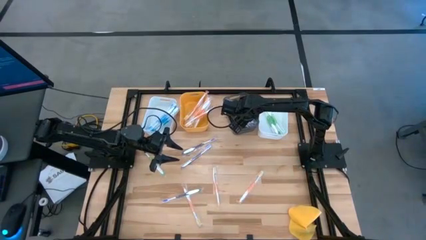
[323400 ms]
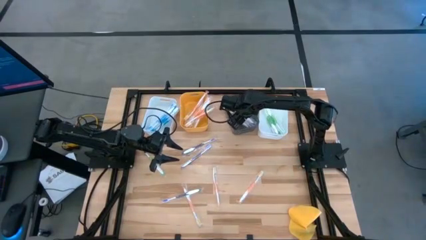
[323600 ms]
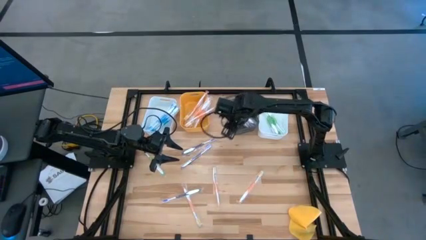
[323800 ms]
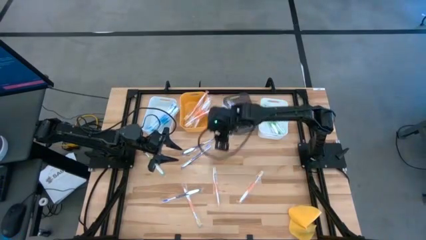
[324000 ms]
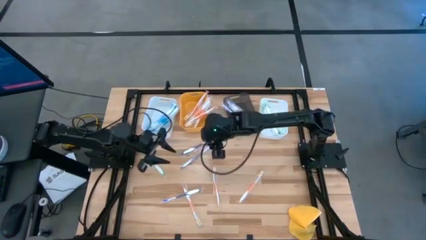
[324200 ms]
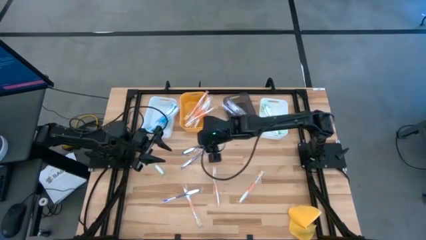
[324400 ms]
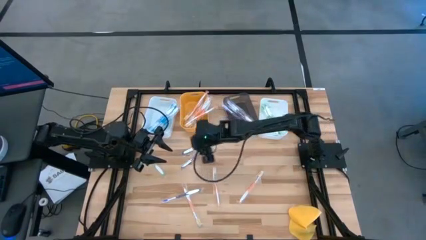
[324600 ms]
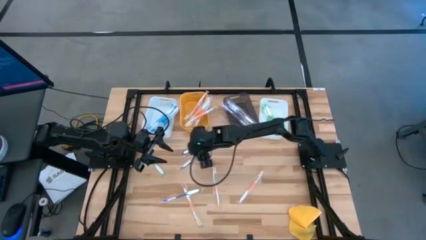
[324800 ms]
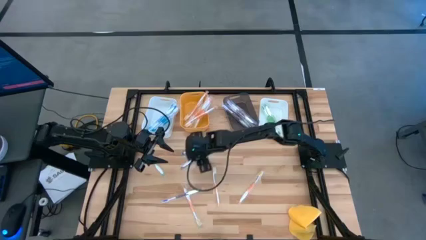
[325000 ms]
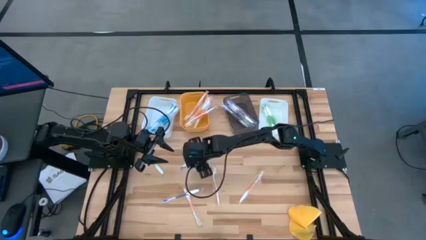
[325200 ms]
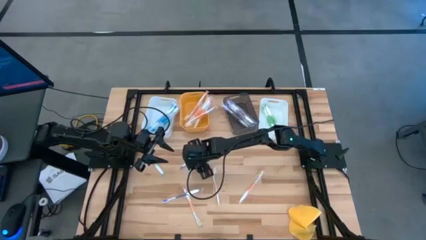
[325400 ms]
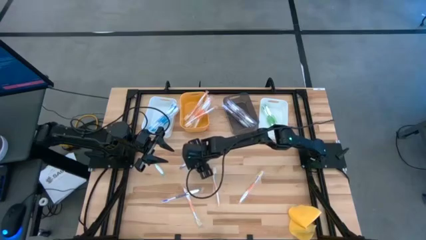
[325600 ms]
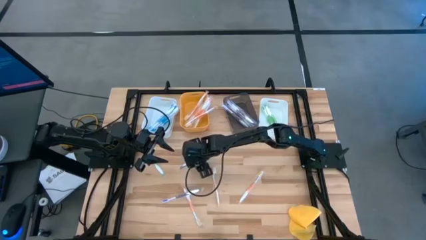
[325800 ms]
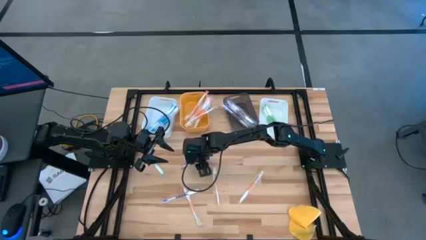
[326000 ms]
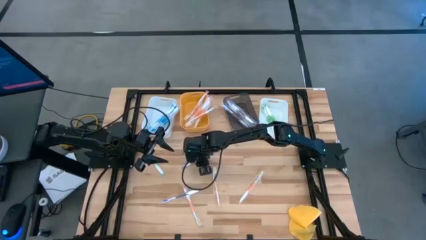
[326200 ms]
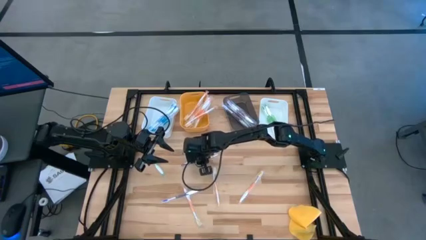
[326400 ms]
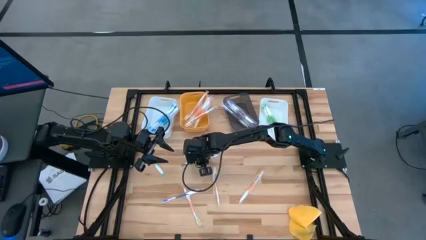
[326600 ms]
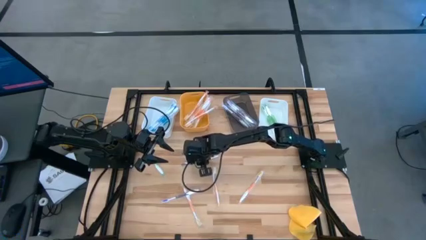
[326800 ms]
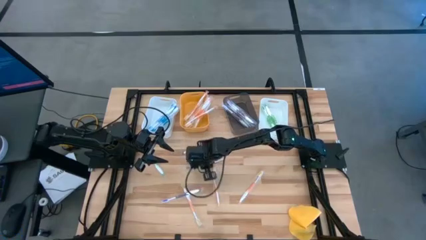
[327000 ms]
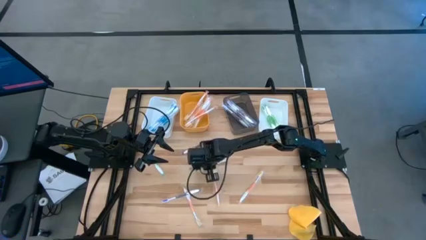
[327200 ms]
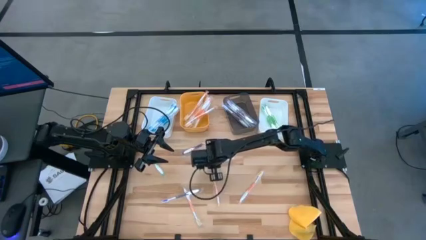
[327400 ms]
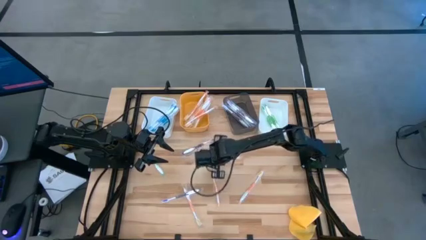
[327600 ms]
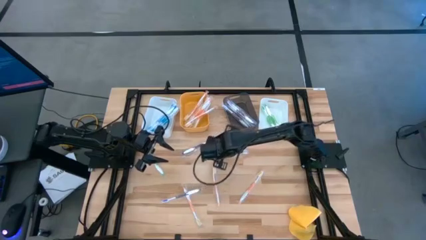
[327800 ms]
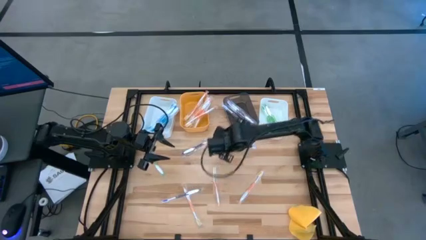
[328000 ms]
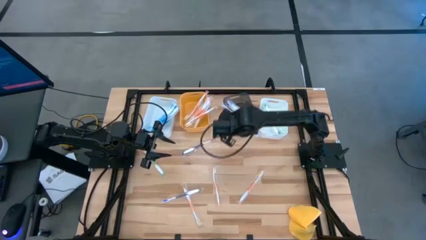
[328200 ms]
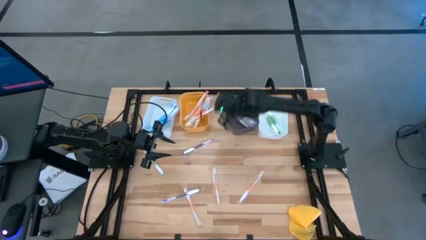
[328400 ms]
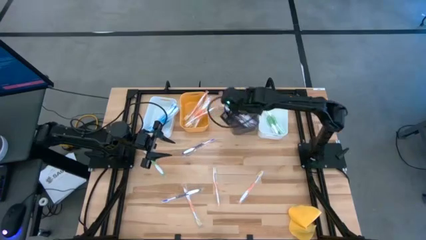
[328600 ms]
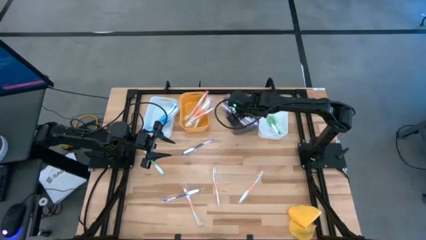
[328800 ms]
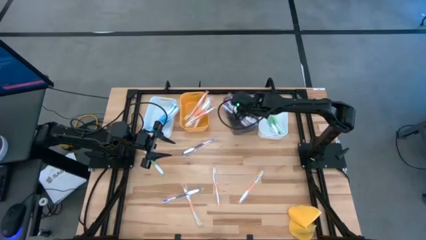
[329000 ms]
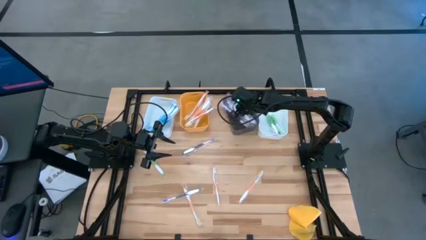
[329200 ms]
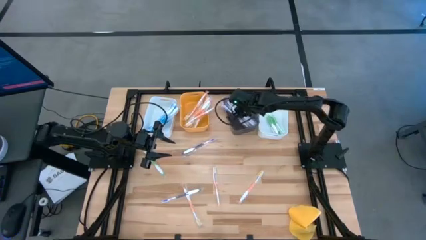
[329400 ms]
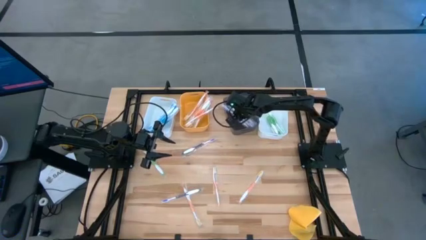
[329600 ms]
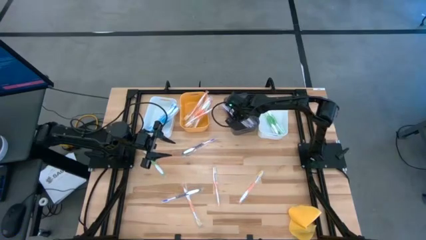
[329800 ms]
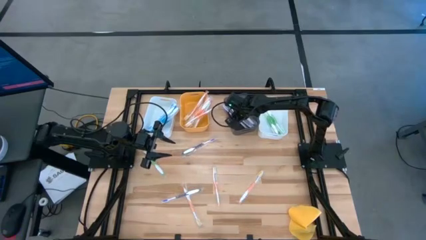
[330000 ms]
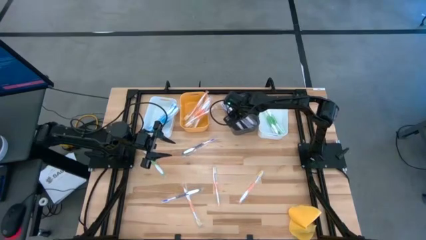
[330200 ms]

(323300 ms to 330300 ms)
Task: Pick & Place Toothbrushes
Put the violet toothbrush into the gray bin

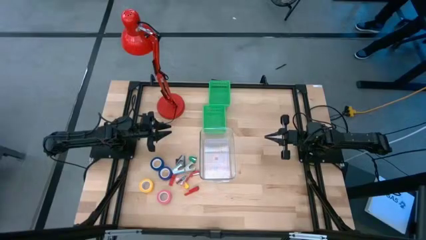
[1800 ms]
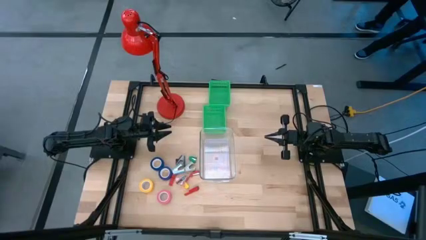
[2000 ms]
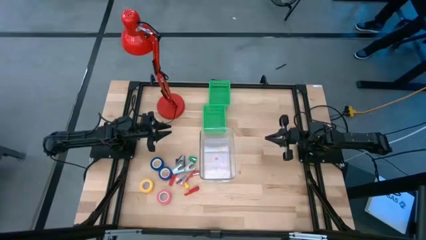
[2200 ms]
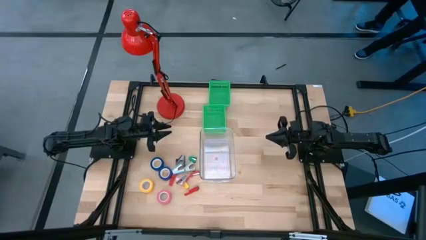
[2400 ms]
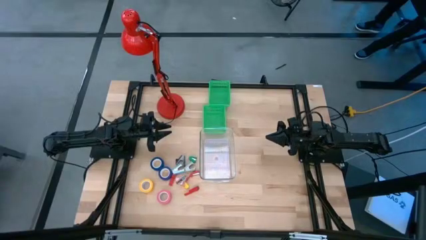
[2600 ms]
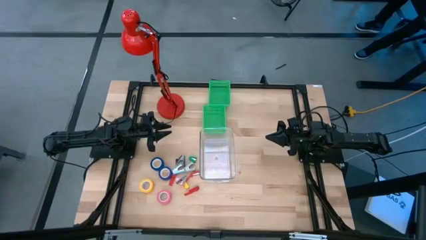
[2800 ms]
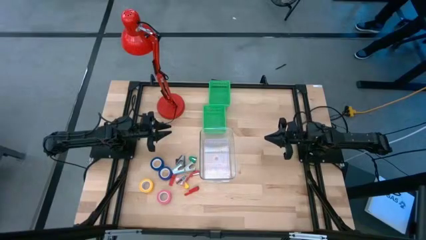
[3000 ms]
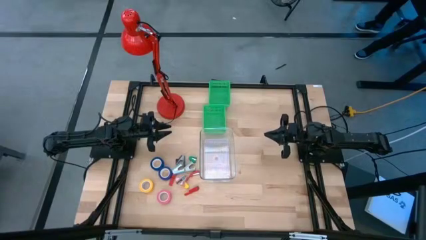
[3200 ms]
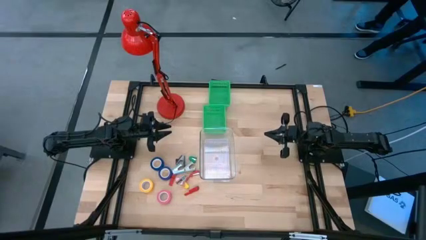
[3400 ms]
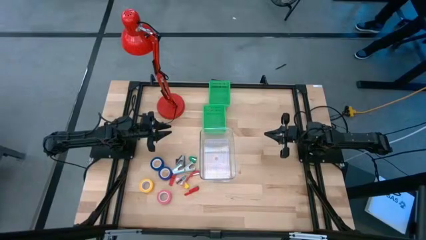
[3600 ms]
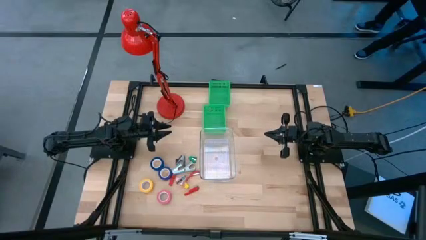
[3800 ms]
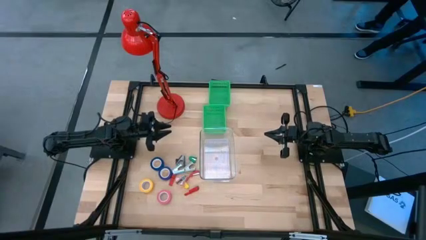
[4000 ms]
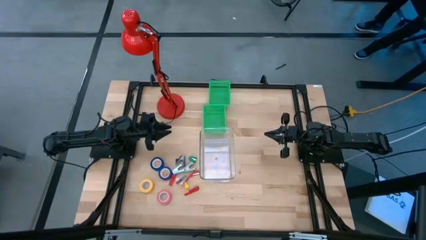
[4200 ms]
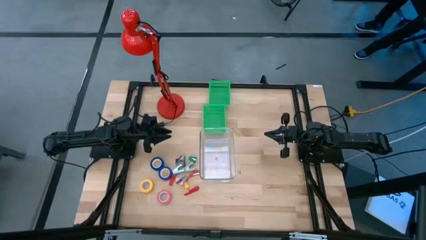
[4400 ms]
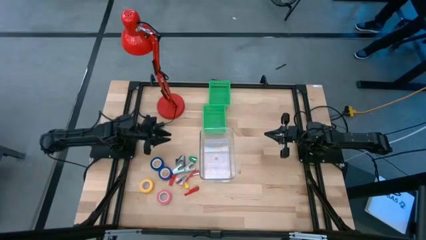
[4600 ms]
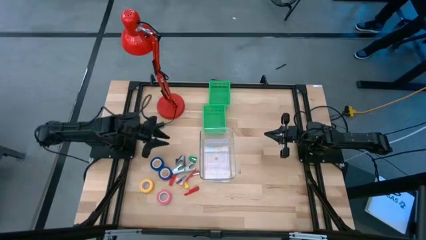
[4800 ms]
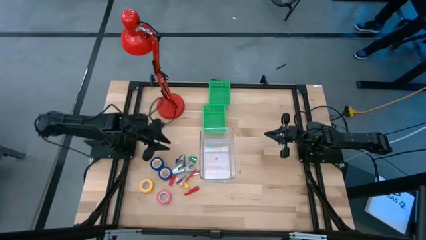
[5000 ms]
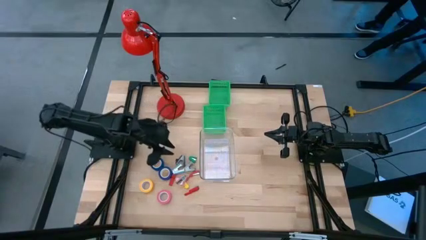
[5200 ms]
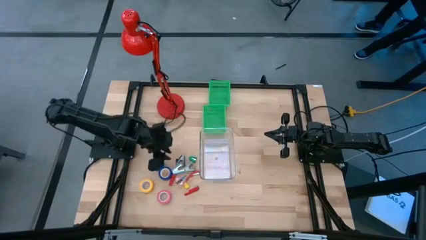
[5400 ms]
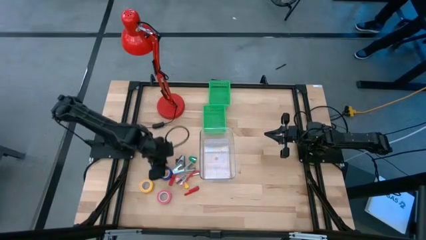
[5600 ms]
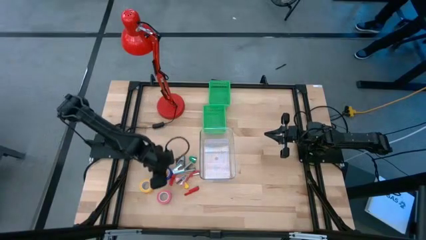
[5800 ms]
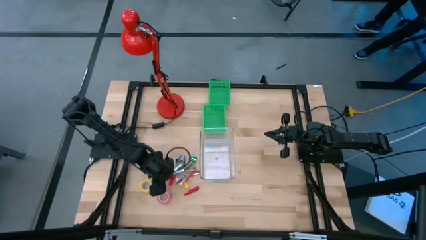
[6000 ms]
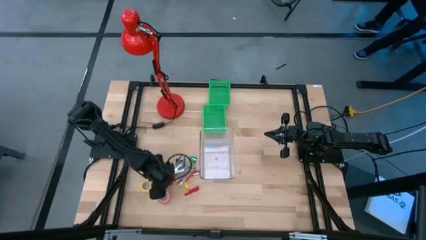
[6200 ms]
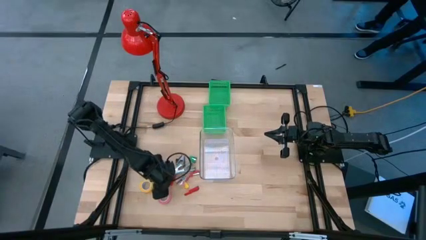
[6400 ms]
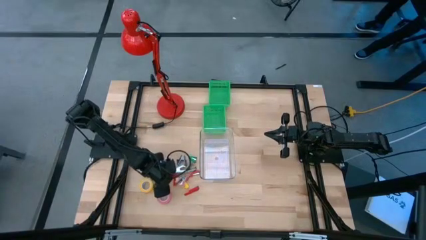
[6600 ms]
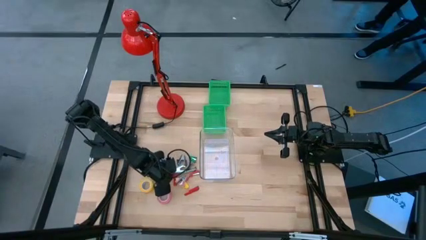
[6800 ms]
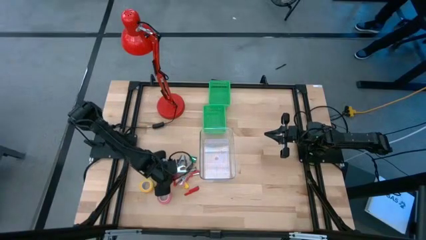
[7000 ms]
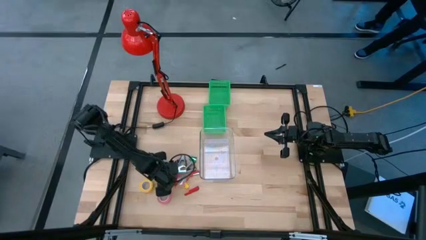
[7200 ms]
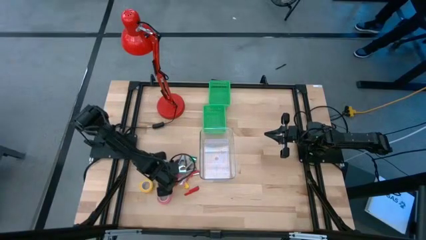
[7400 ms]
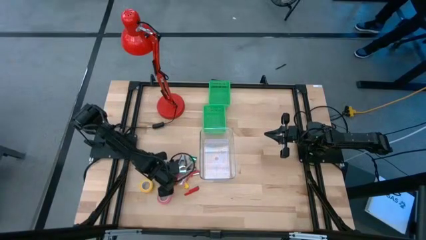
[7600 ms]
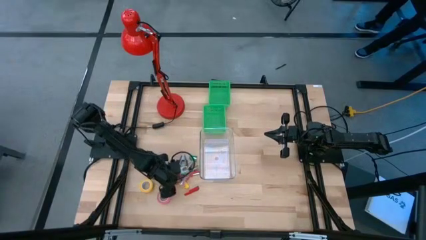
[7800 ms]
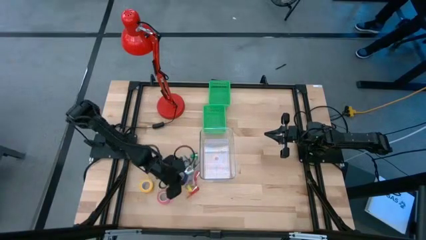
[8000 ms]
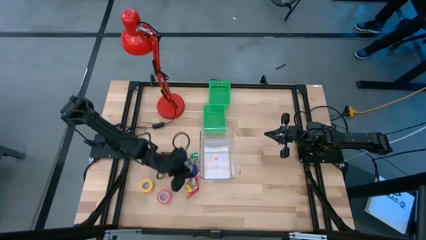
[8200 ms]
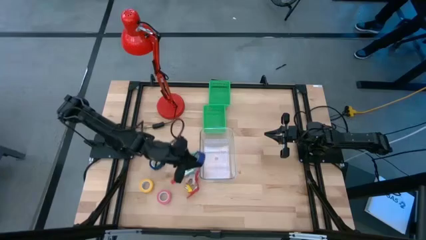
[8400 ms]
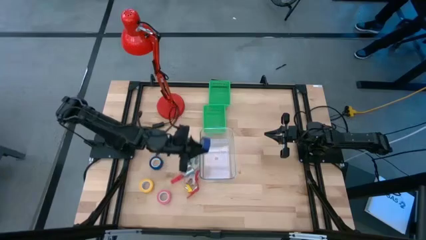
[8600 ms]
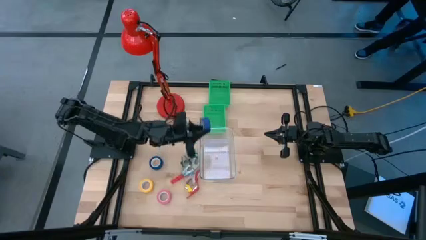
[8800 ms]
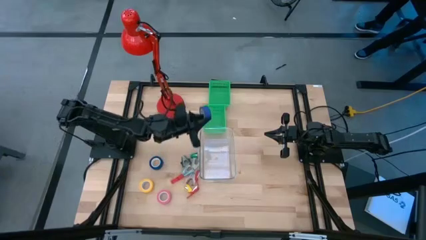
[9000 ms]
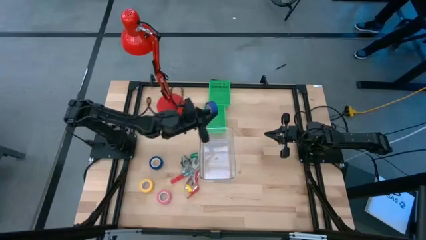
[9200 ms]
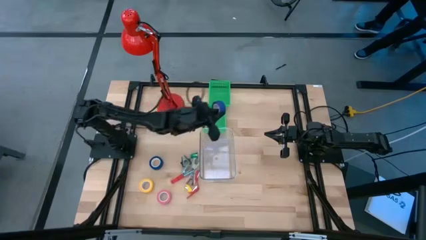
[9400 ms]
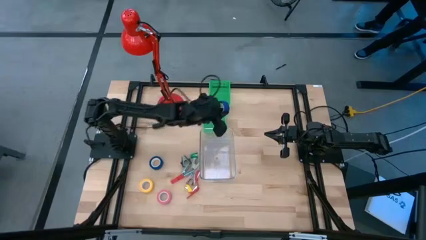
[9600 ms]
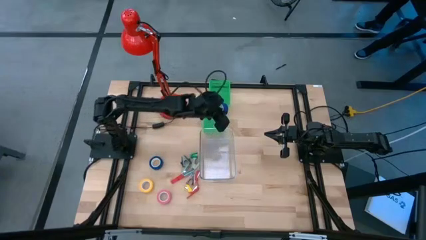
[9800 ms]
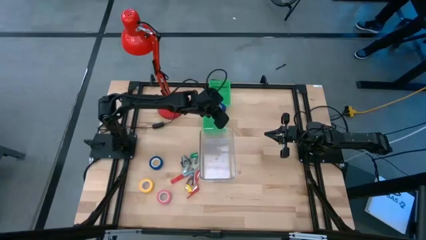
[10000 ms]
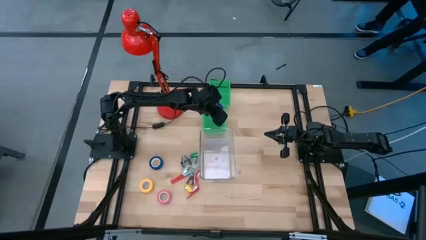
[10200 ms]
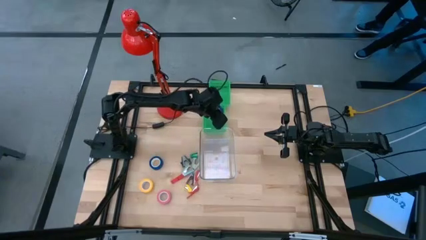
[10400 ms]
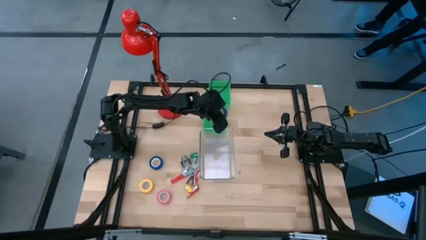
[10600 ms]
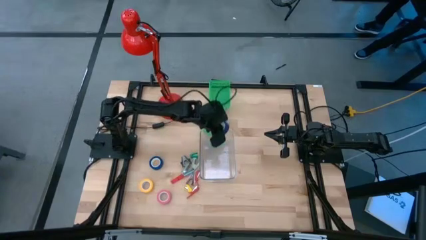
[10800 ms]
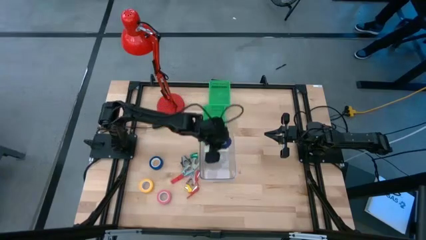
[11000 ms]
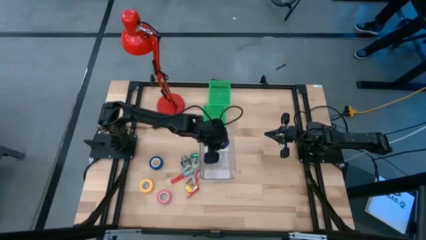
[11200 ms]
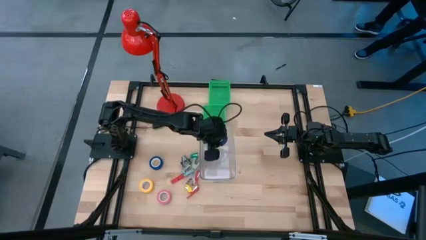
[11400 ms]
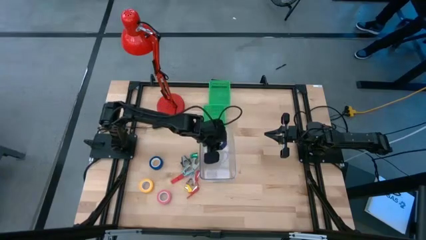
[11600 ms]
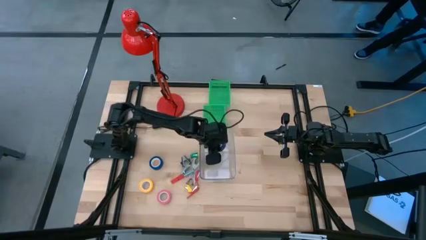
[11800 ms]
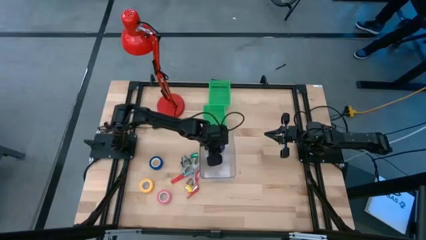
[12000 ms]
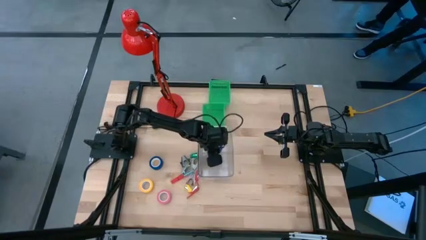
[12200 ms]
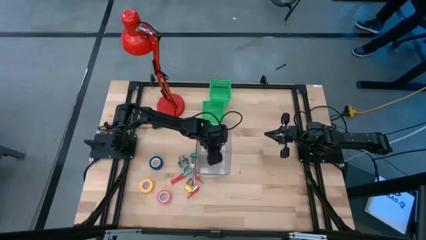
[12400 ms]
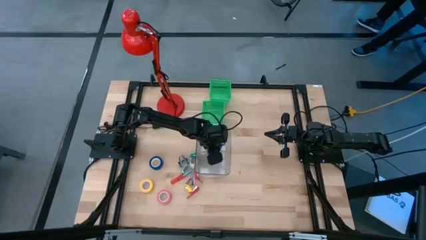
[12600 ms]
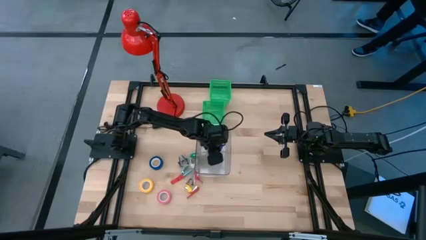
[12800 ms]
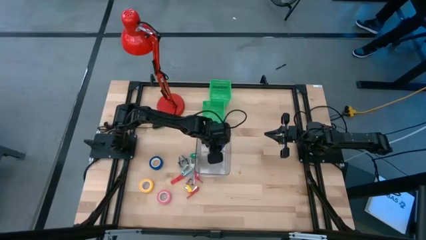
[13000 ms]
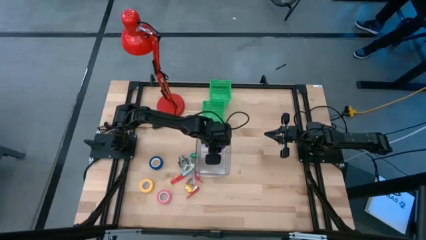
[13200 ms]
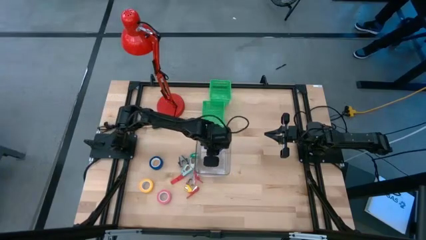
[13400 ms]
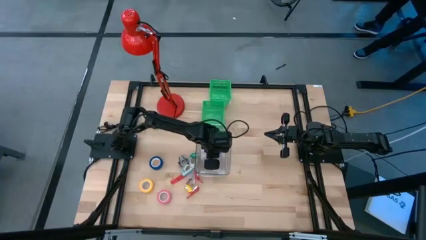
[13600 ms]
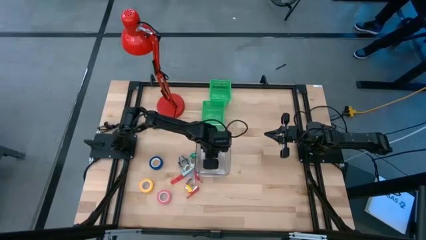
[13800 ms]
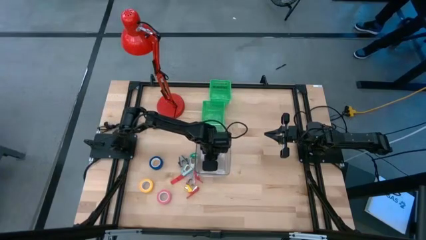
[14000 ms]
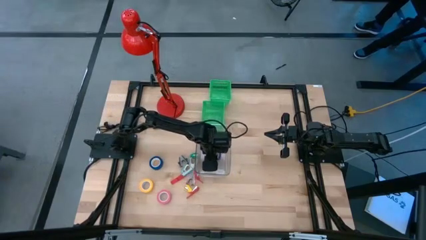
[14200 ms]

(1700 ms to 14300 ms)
Task: Pick and place Stapler, Stapler remover, tape
Put the bottom blue tape into the transparent bin
